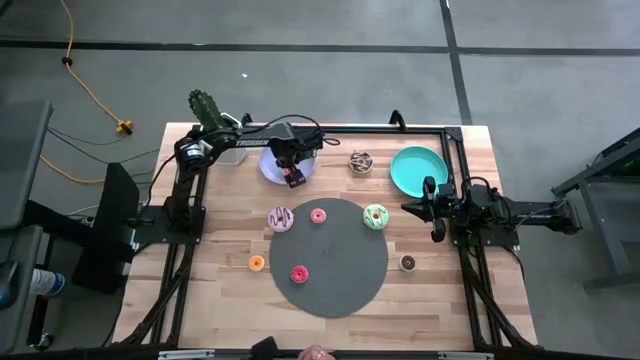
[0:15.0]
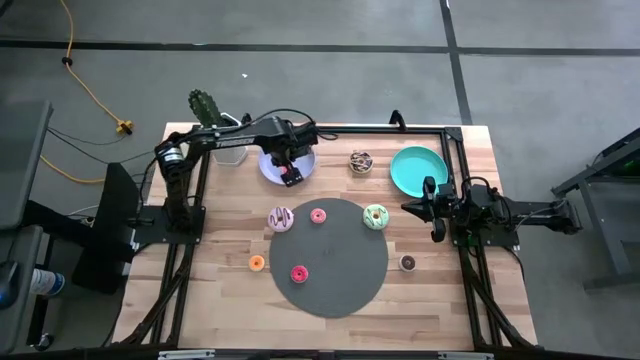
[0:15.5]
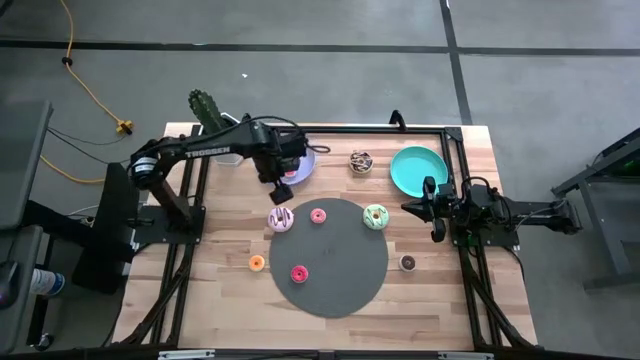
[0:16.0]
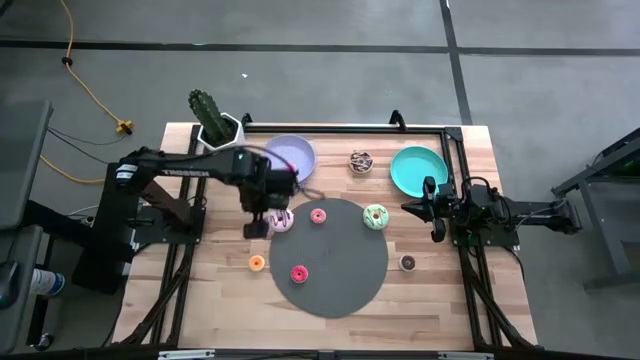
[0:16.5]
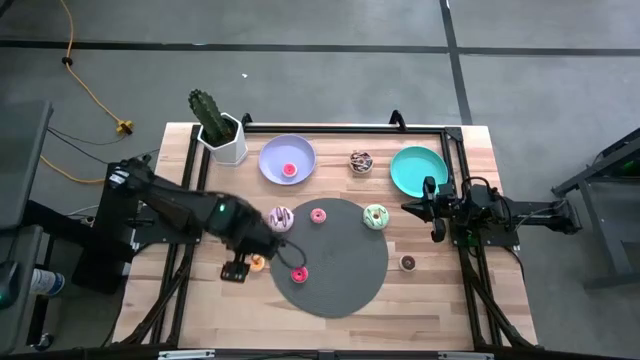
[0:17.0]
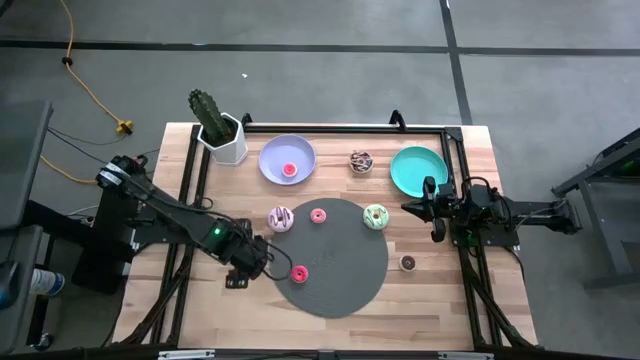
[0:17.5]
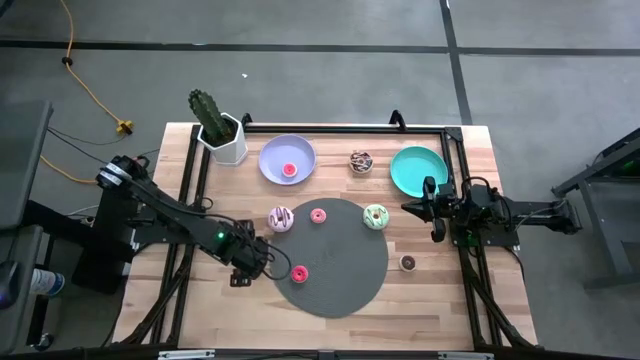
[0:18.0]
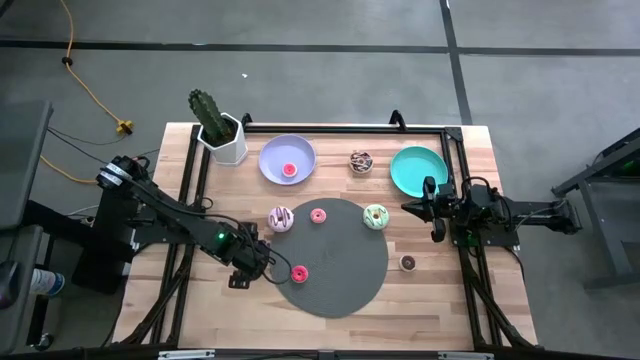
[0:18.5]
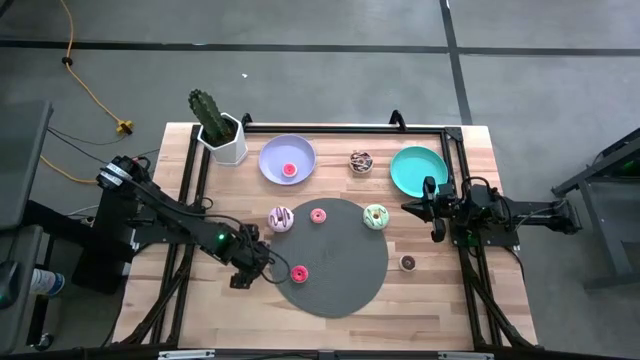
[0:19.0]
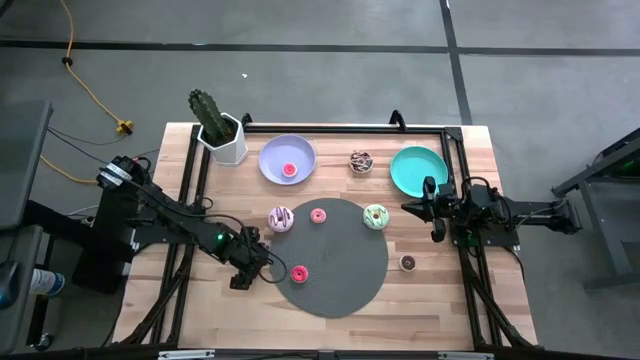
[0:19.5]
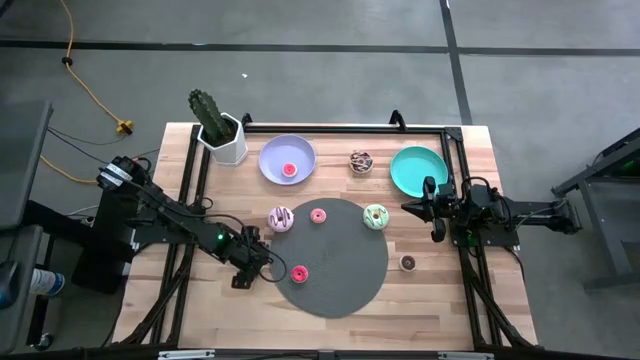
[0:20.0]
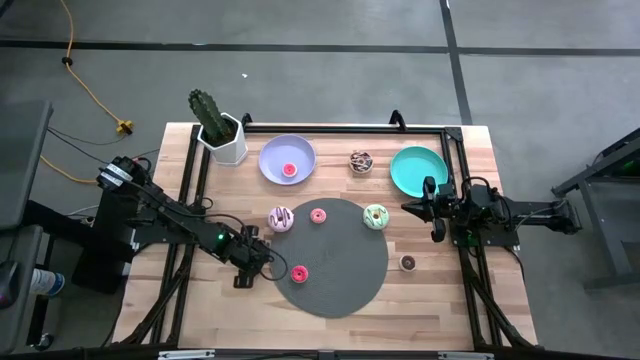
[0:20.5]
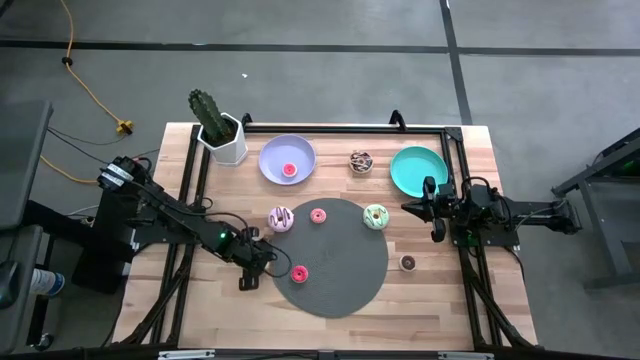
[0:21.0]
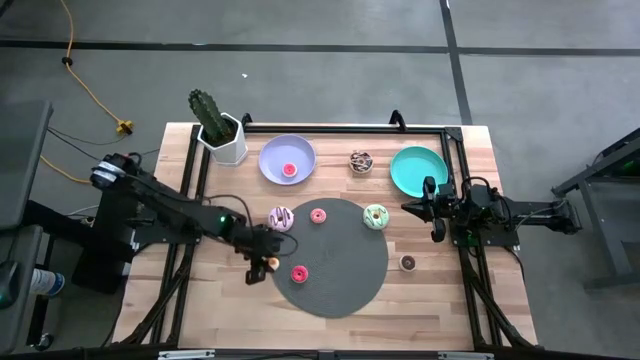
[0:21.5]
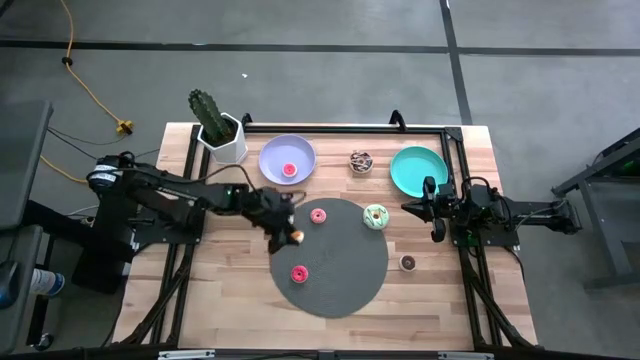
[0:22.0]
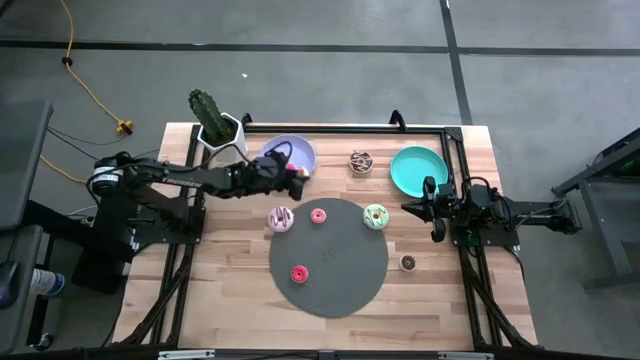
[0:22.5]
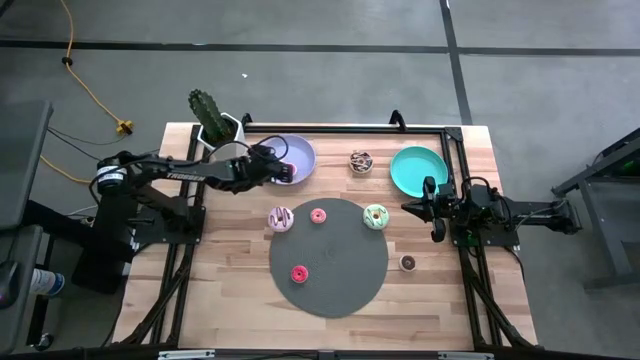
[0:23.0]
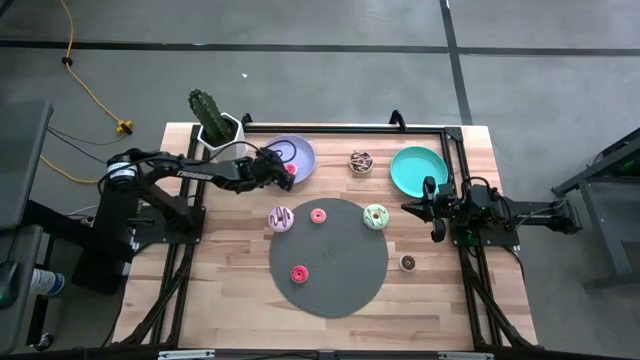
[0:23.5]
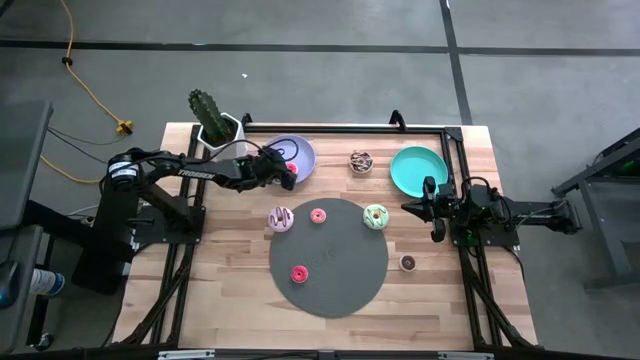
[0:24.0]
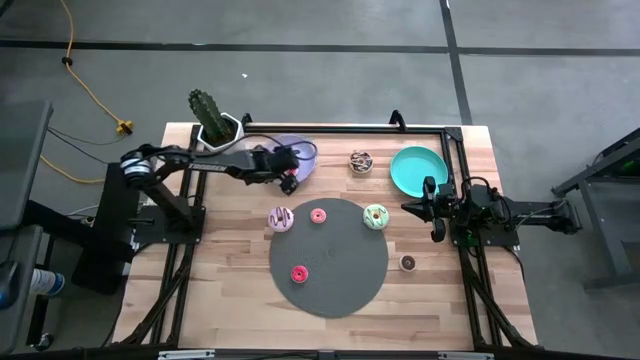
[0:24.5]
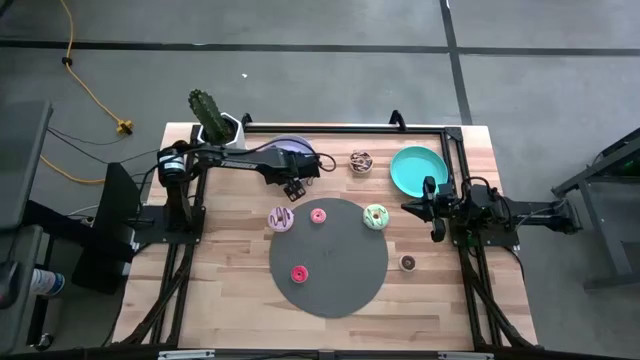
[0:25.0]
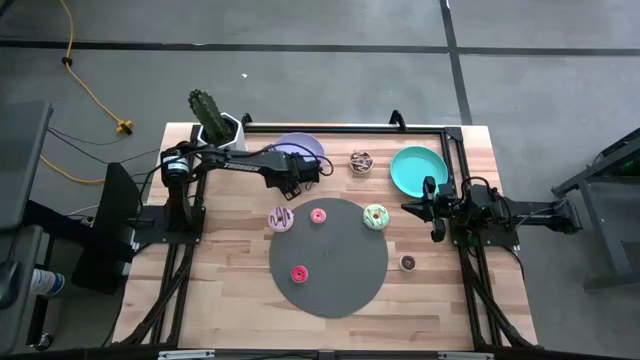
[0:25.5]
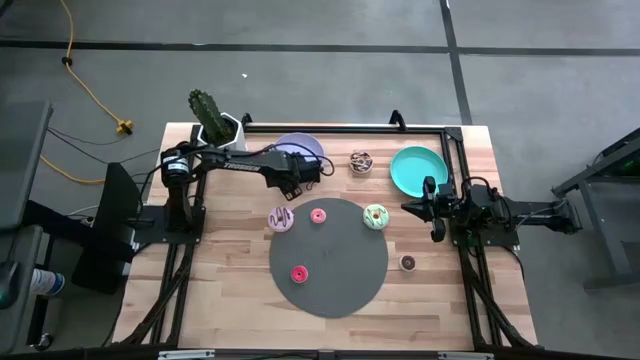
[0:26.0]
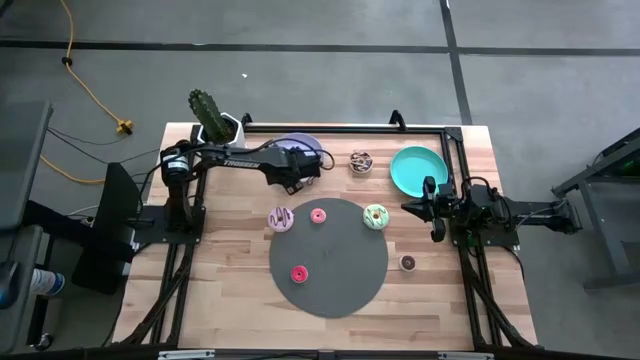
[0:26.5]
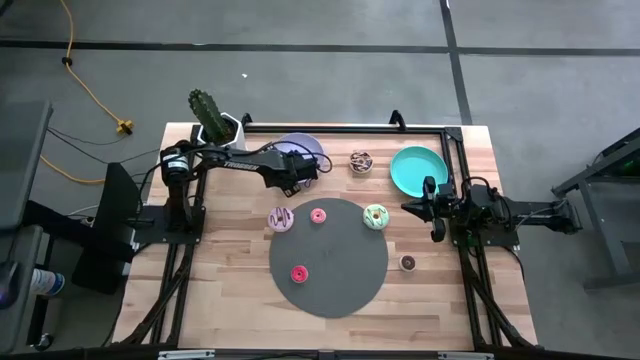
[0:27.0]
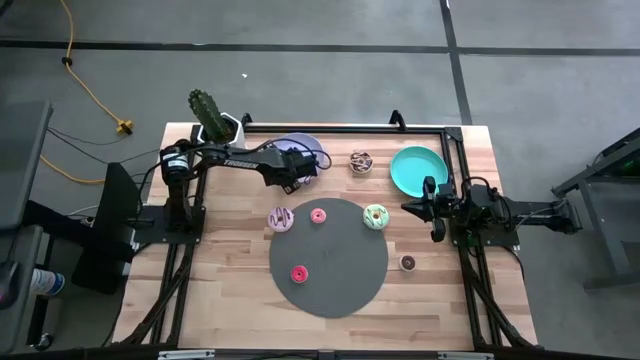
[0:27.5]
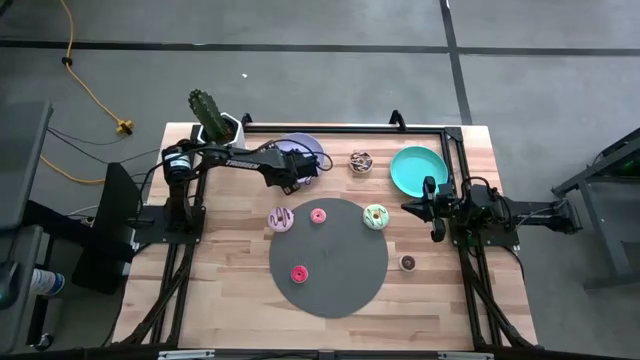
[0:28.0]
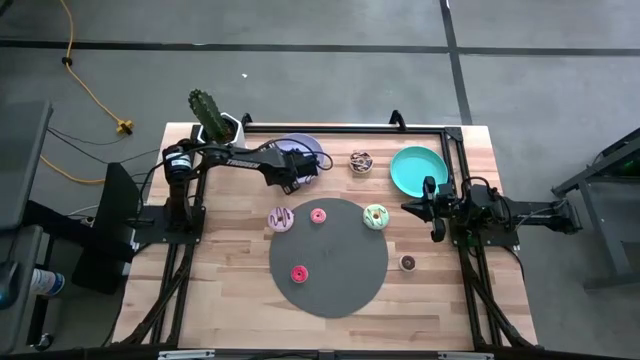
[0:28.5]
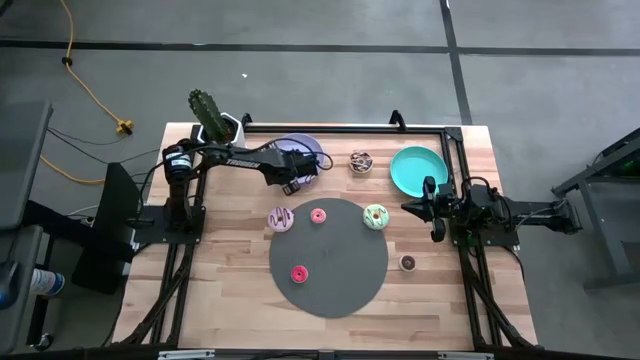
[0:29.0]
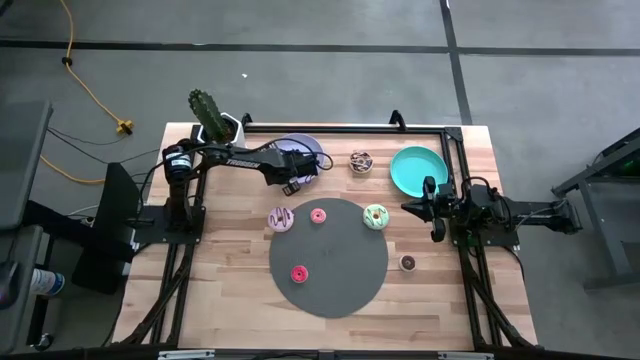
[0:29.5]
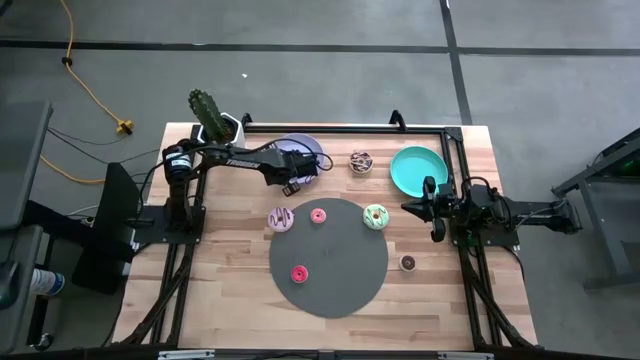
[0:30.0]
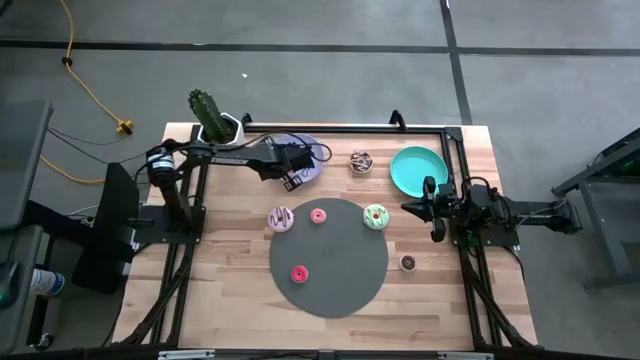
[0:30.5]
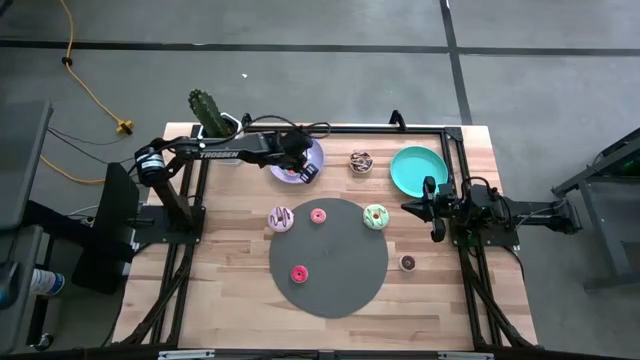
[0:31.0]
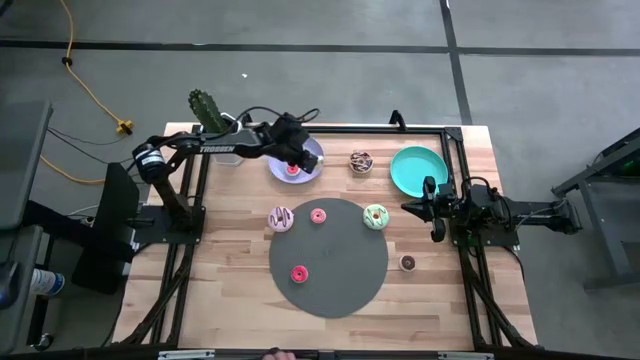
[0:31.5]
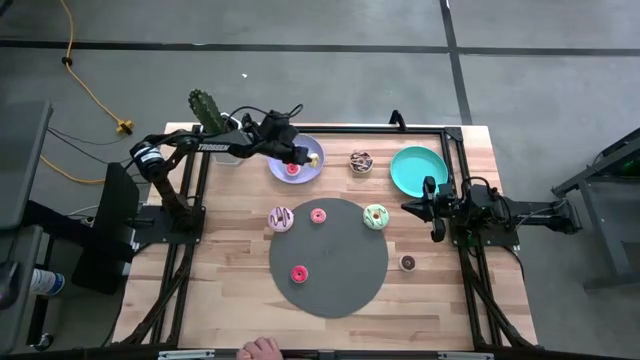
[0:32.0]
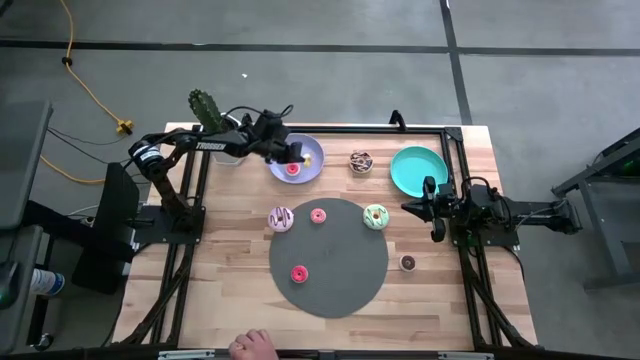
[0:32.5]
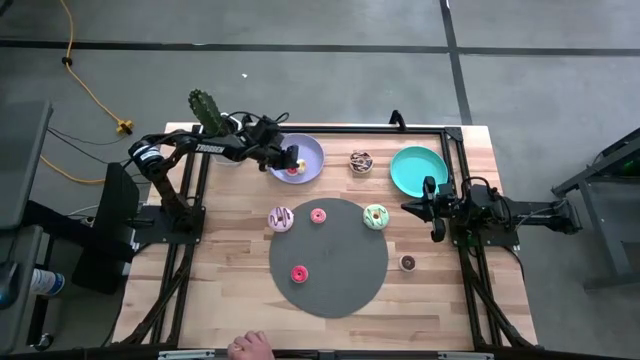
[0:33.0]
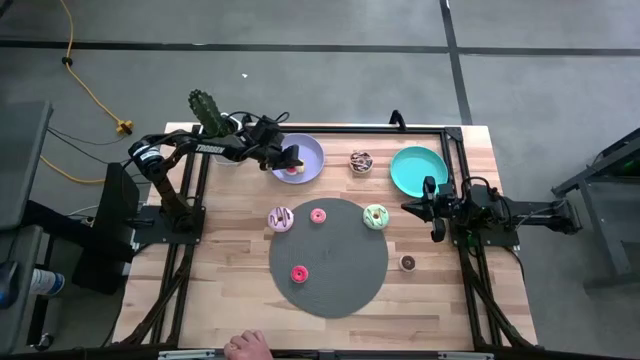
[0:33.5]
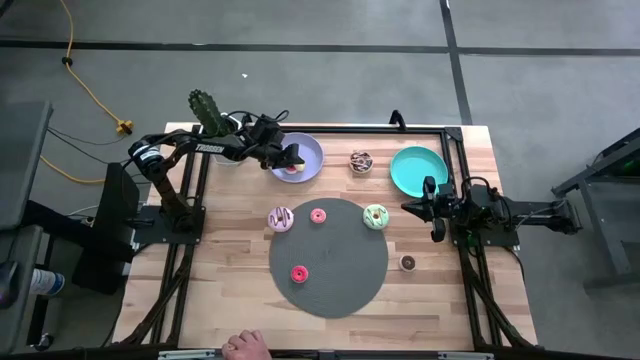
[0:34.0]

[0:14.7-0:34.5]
Task: Pick & Place donuts
Put the small yellow doughnut on the purple plate

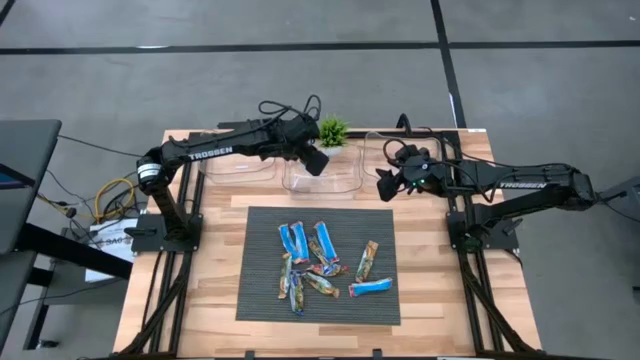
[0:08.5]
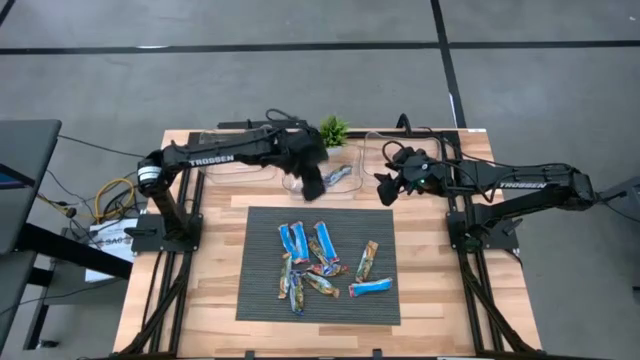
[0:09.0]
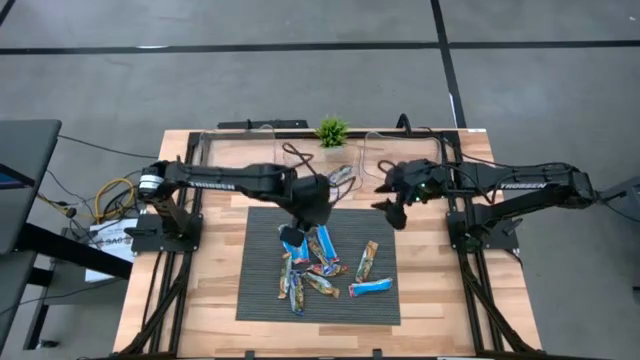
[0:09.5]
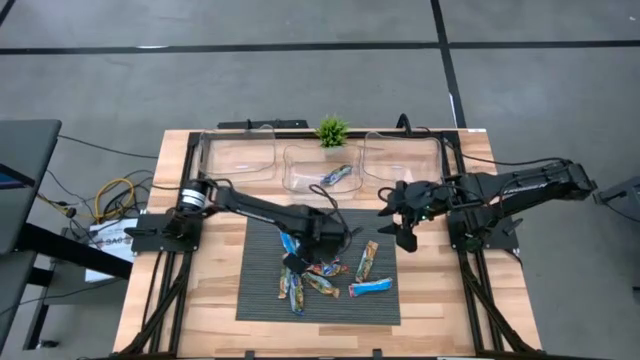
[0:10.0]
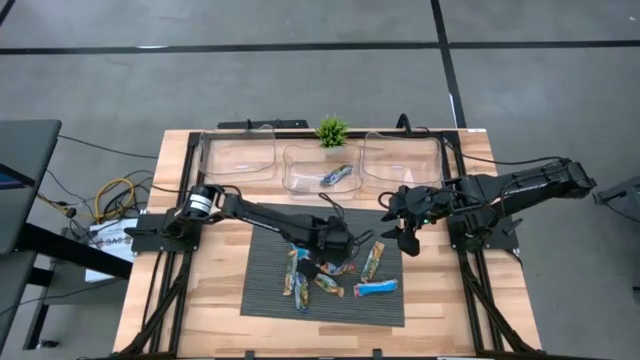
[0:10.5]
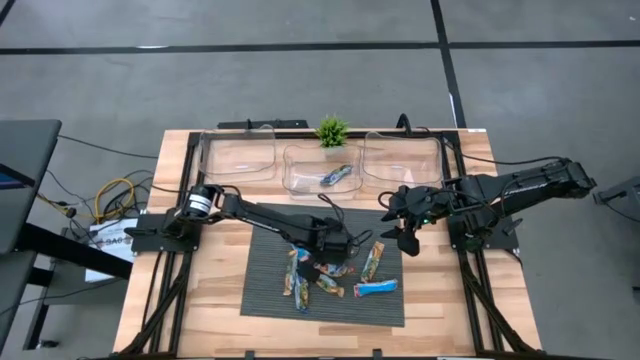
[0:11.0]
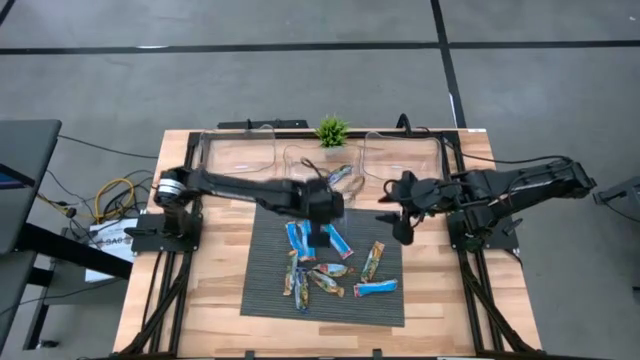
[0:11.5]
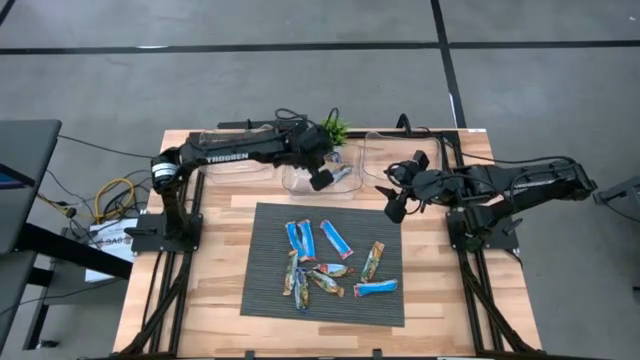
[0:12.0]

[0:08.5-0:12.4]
Task: Pick and place Granola Bars by type
Put the blue granola bar into the middle transparent bin
